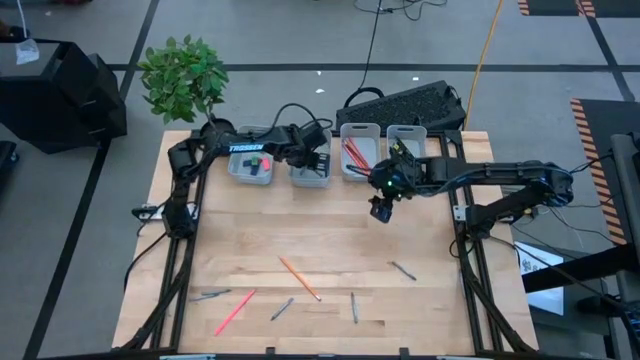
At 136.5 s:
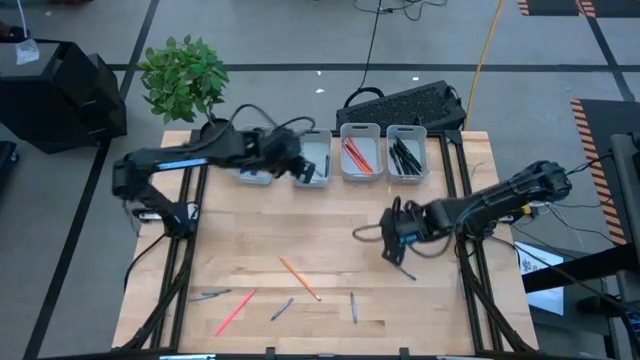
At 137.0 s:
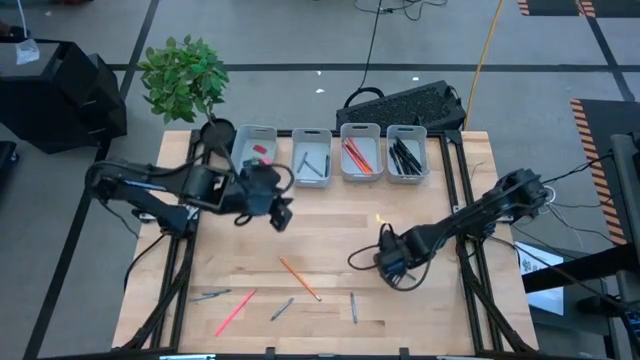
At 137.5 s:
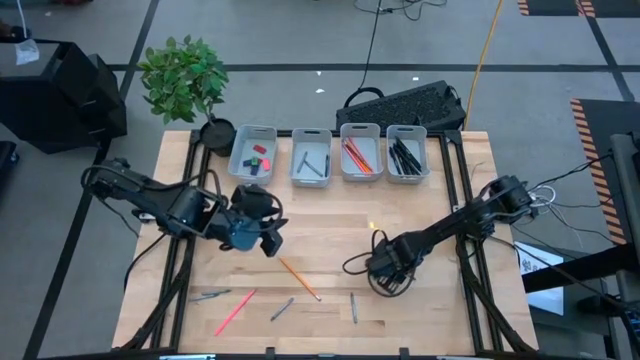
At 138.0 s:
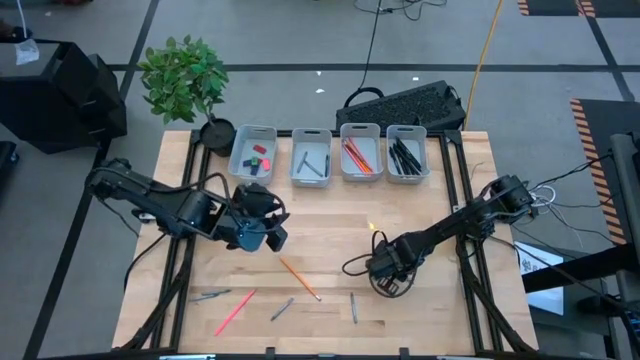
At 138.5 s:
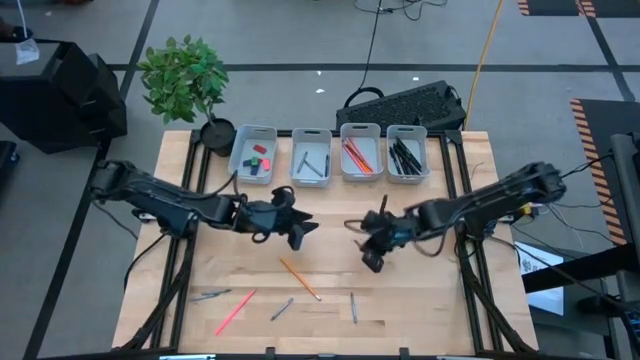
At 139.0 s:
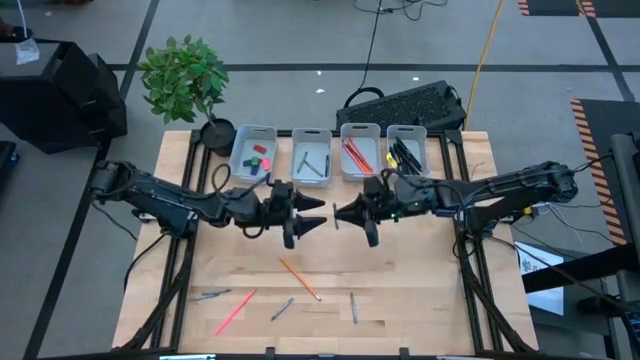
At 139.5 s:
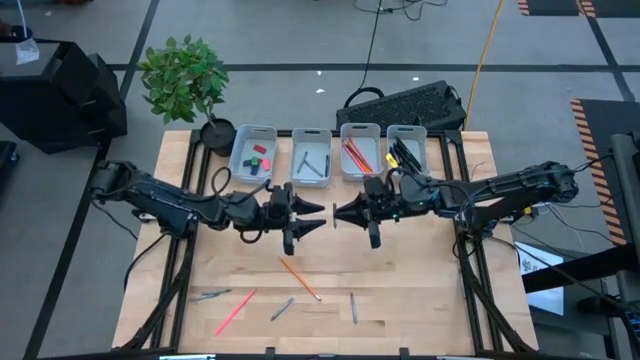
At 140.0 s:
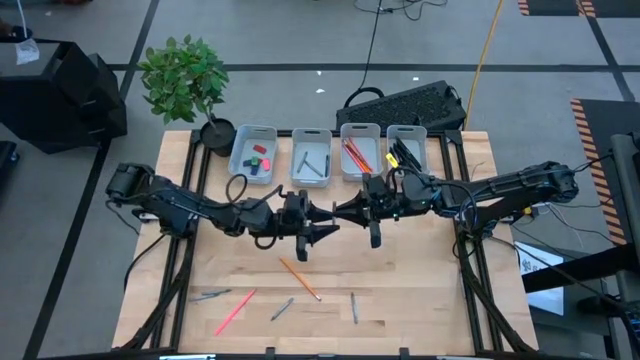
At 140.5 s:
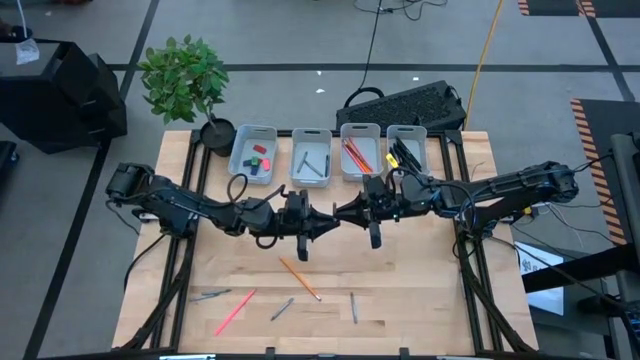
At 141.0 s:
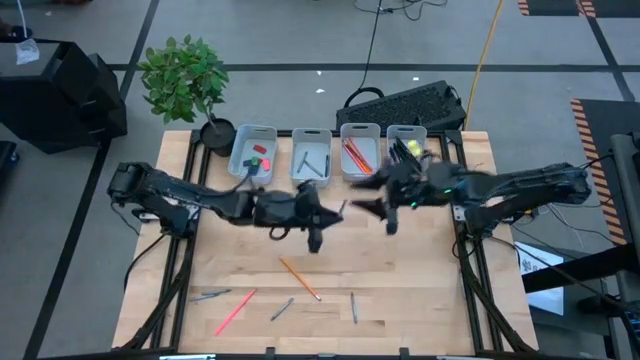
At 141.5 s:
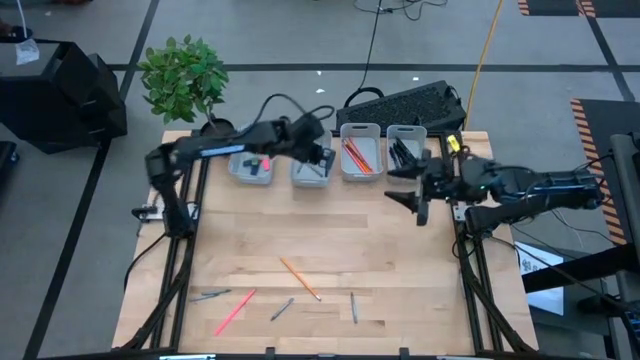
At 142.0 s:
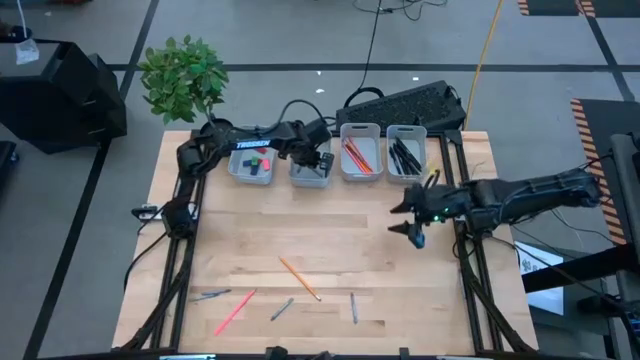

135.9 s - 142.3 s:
Task: Sort crayons/erasers/pens/pencils in bins
Put the gray crayon into the middle left gray bin

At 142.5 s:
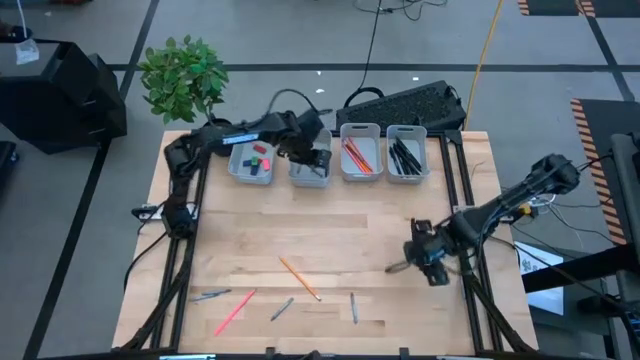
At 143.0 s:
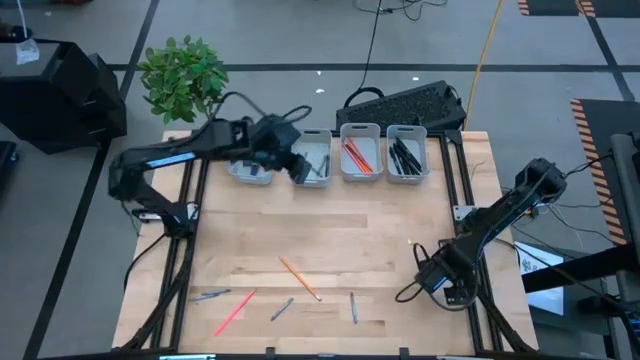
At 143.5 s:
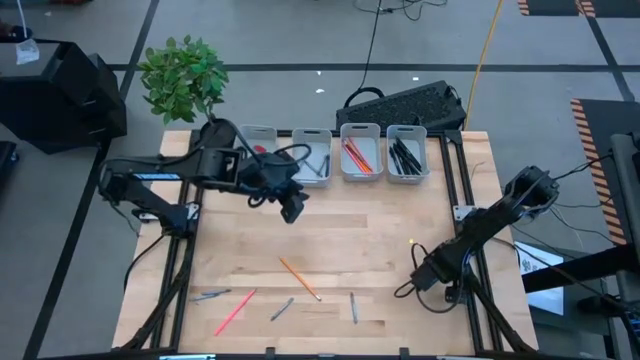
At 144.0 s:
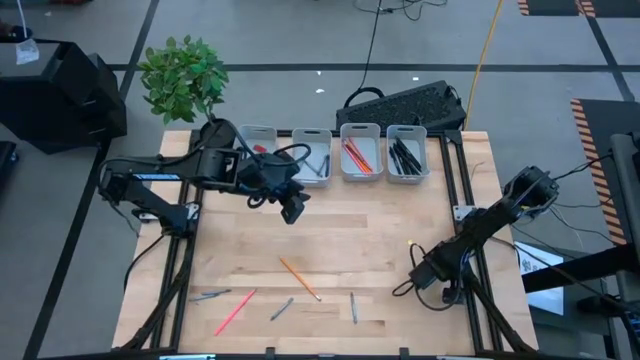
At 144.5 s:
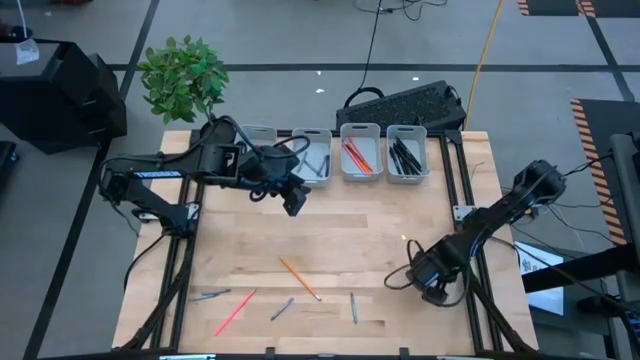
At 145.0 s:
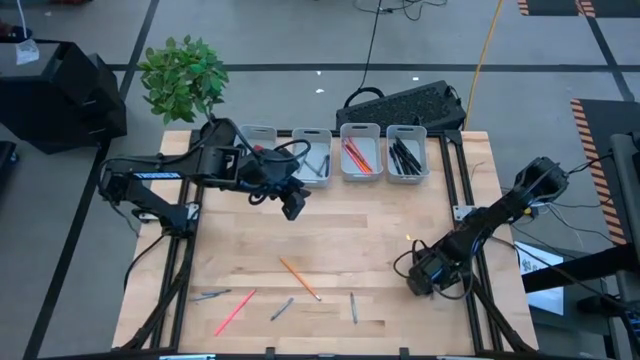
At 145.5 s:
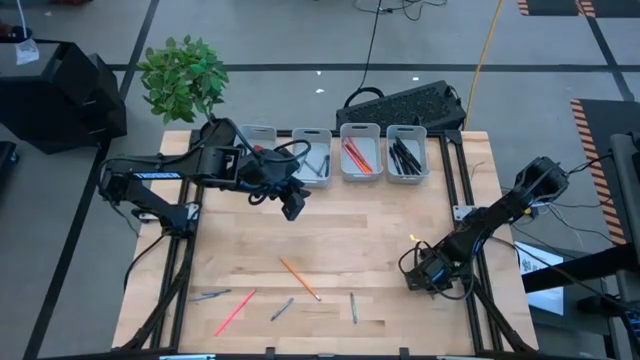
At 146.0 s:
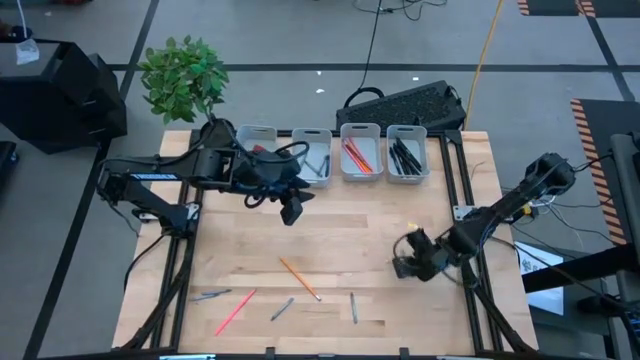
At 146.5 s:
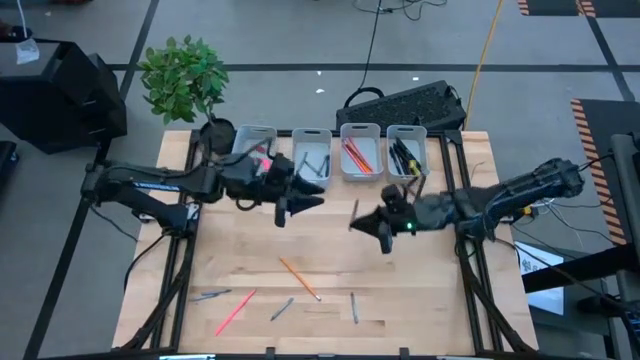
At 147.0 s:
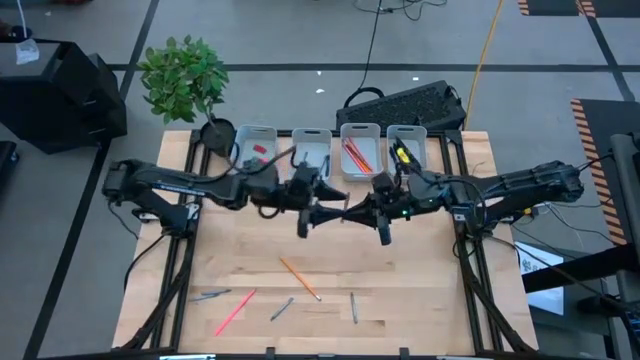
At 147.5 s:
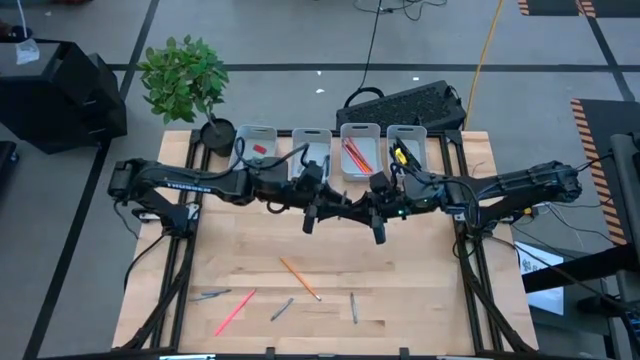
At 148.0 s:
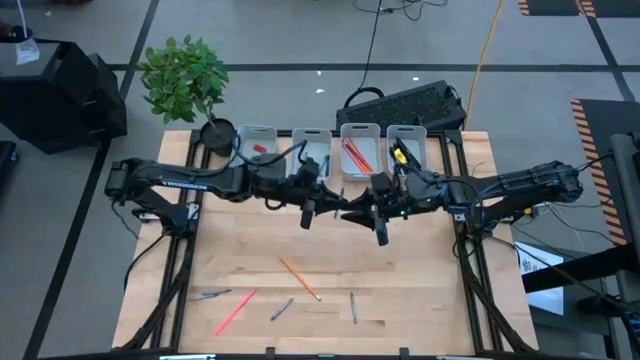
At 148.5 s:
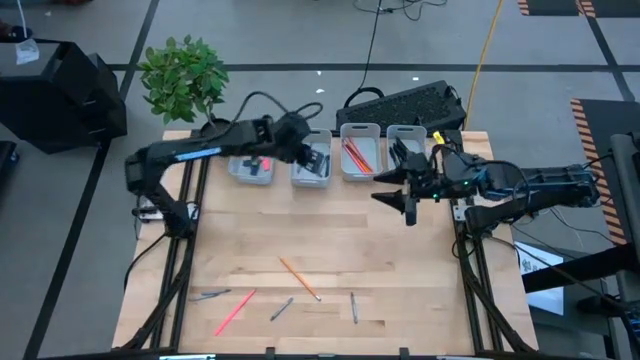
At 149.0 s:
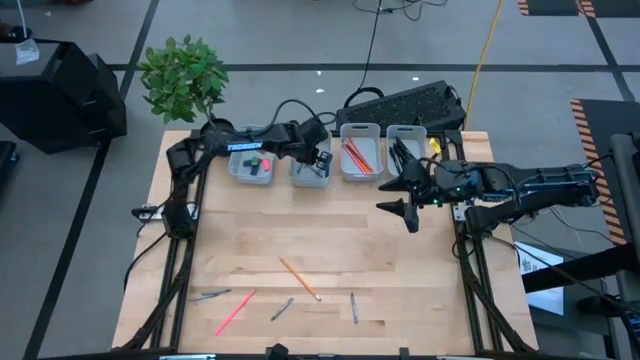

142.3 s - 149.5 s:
Put the gray crayon into the middle left gray bin

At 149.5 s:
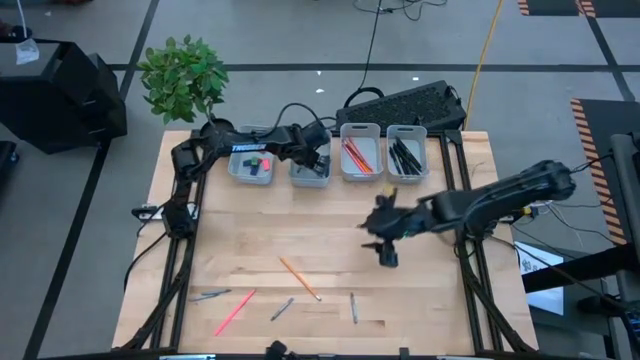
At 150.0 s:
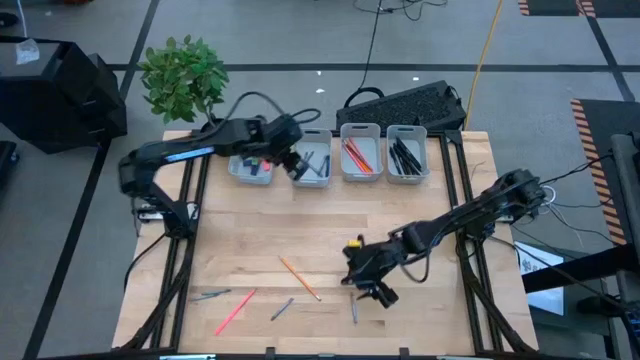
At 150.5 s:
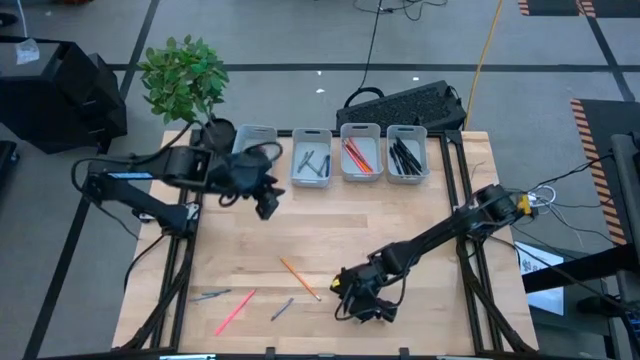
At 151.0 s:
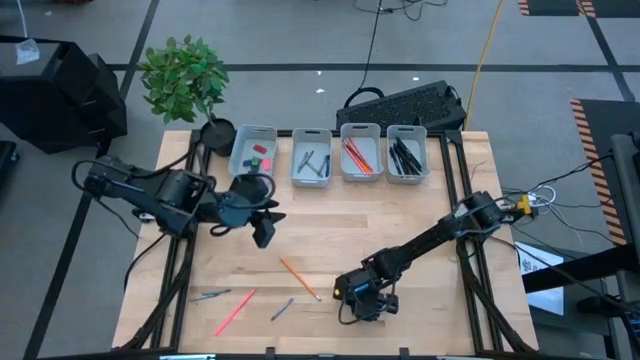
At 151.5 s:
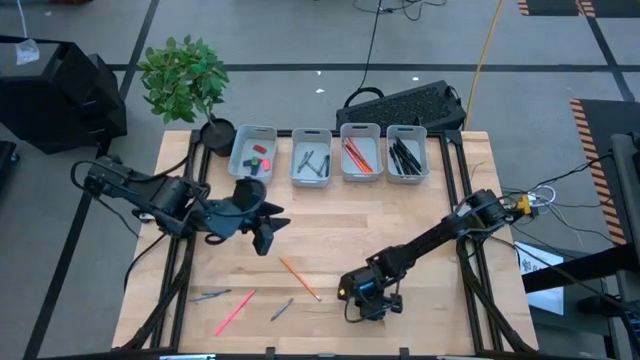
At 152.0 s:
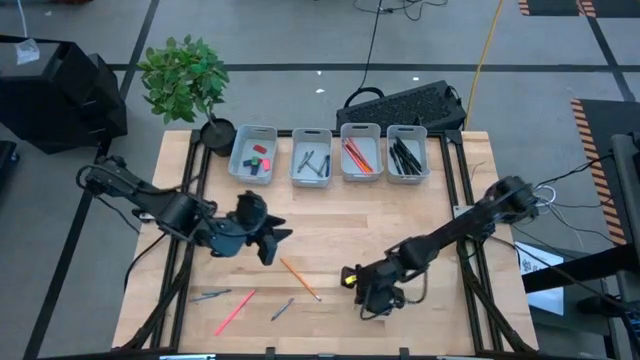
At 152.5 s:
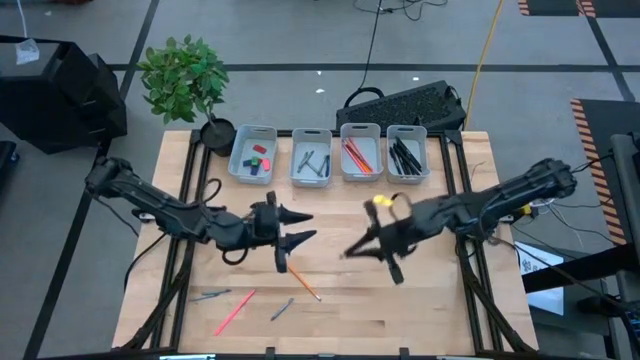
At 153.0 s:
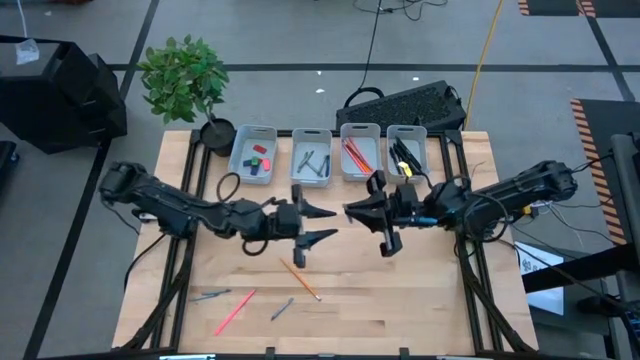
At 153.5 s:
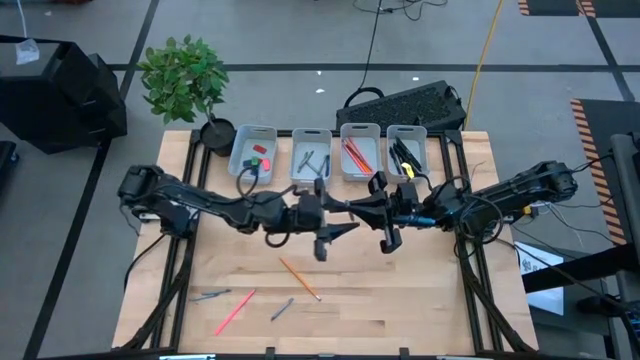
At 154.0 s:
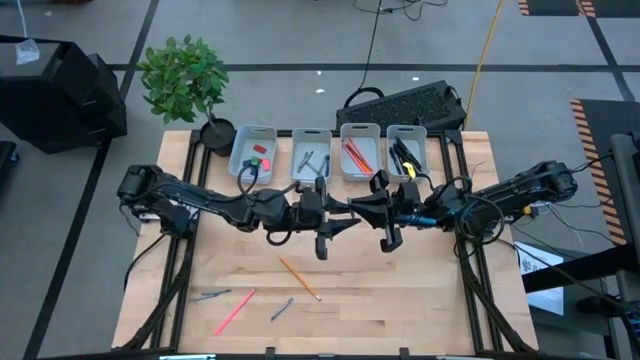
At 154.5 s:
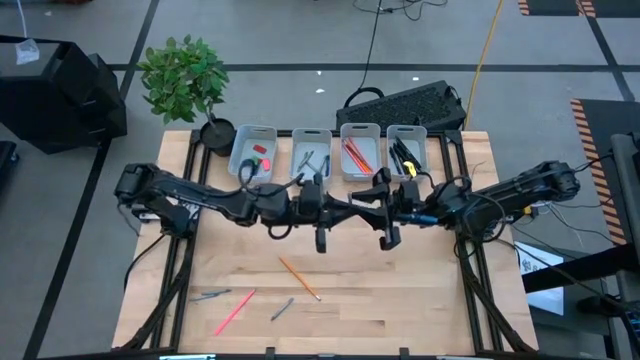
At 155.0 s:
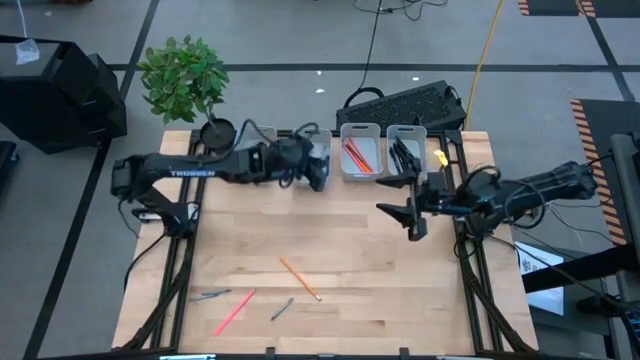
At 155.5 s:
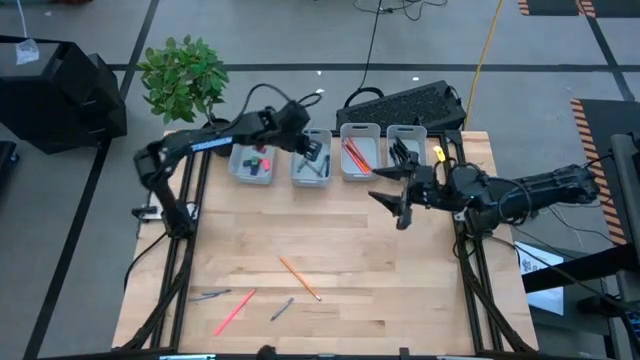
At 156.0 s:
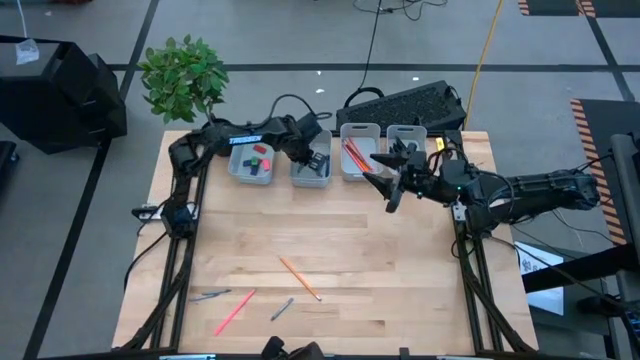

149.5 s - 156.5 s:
Put the gray crayon into the middle left gray bin

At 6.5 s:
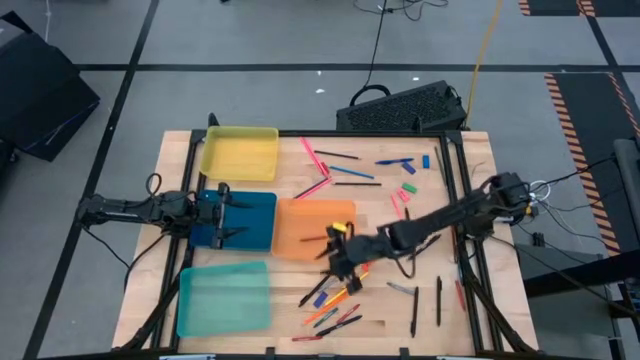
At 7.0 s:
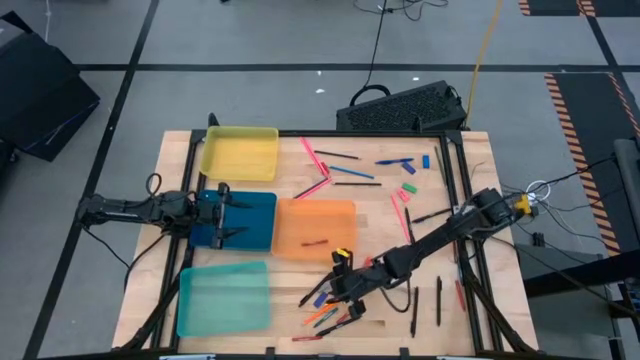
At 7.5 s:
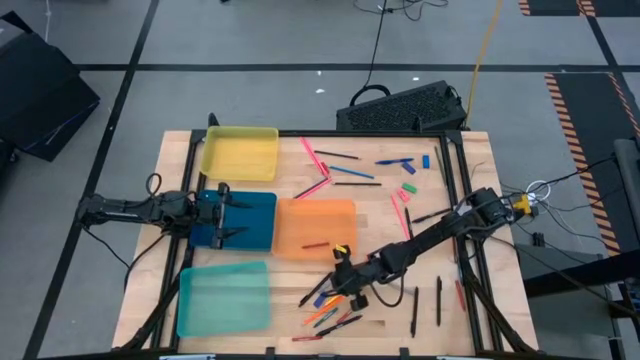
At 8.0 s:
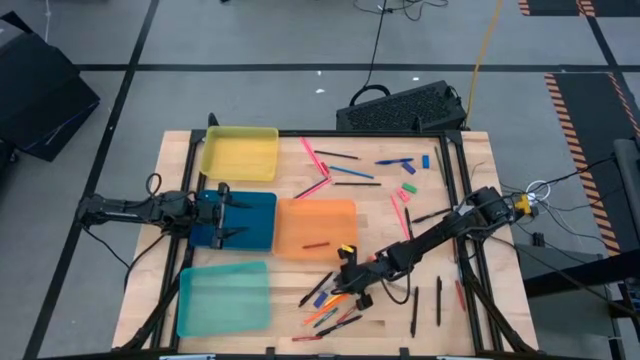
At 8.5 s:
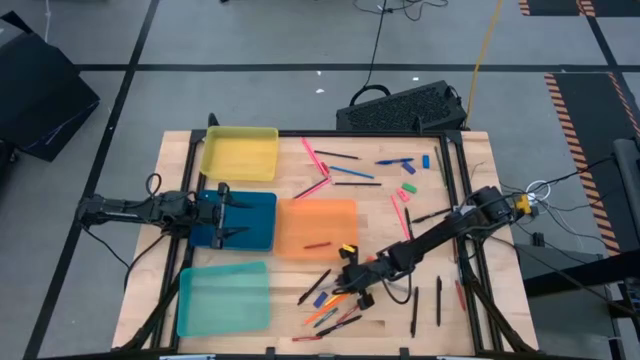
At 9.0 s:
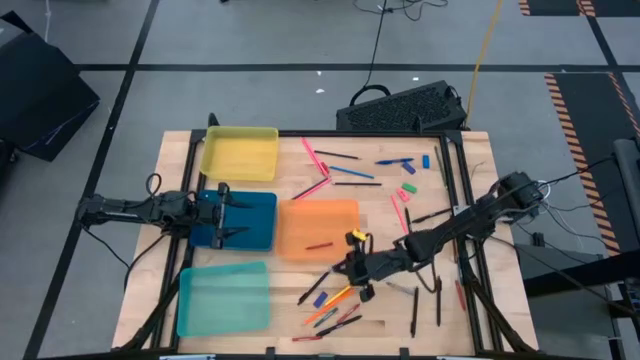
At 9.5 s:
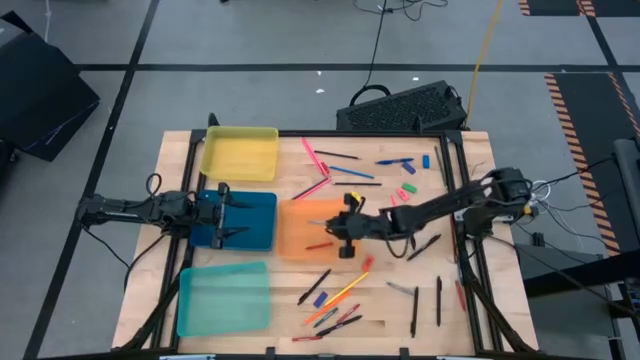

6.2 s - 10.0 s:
Task: Sort crayons/erasers/pens/pencils in bins
Put the gray crayon into the orange bin
